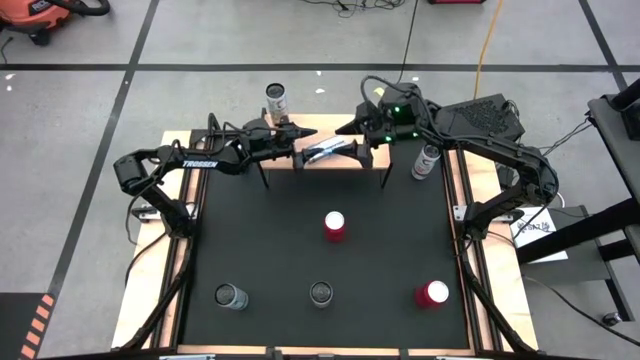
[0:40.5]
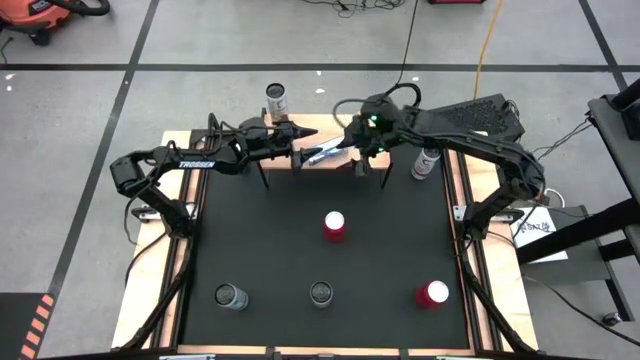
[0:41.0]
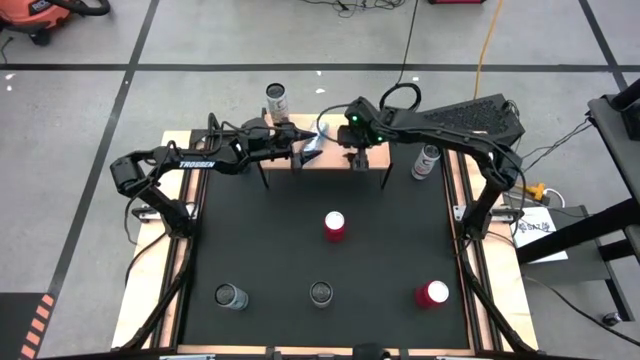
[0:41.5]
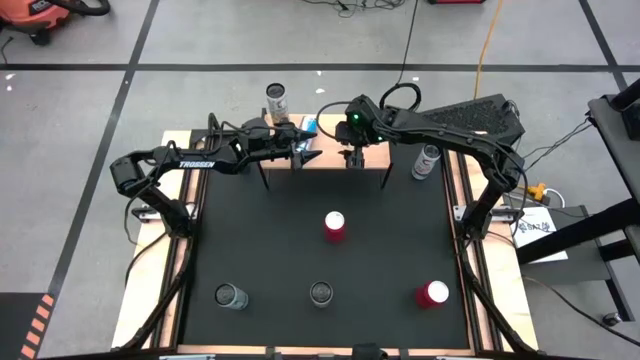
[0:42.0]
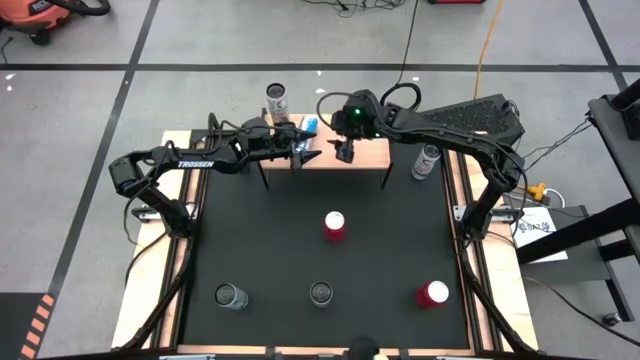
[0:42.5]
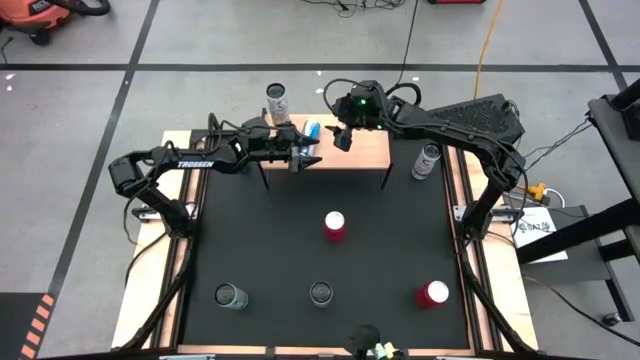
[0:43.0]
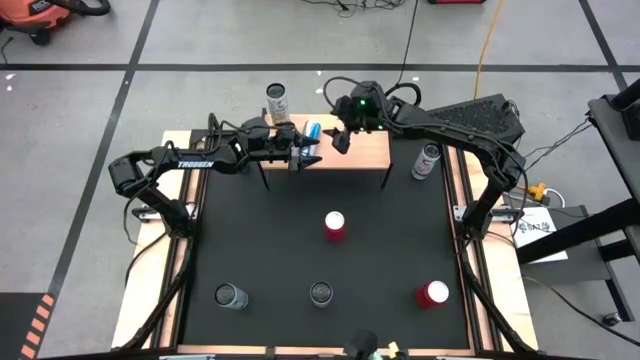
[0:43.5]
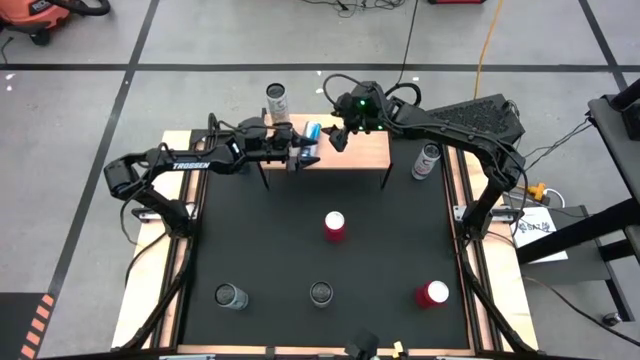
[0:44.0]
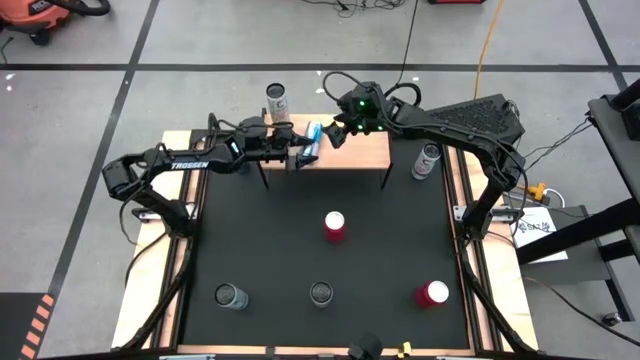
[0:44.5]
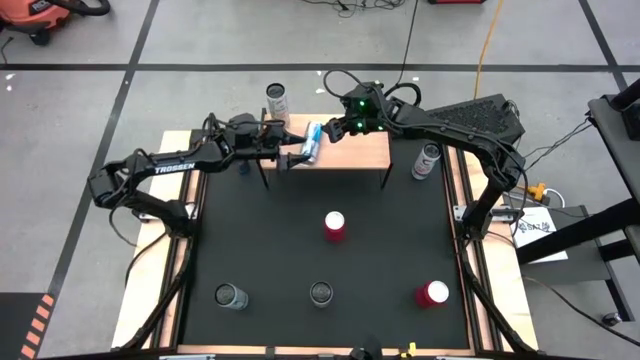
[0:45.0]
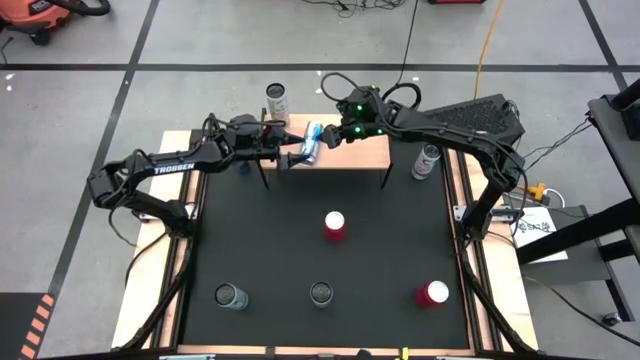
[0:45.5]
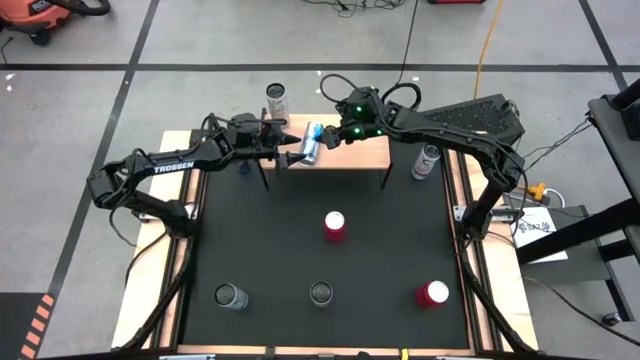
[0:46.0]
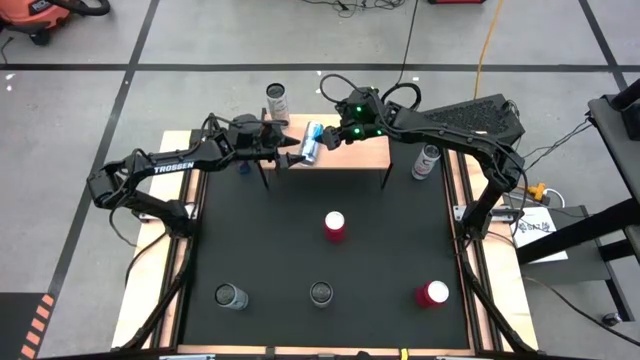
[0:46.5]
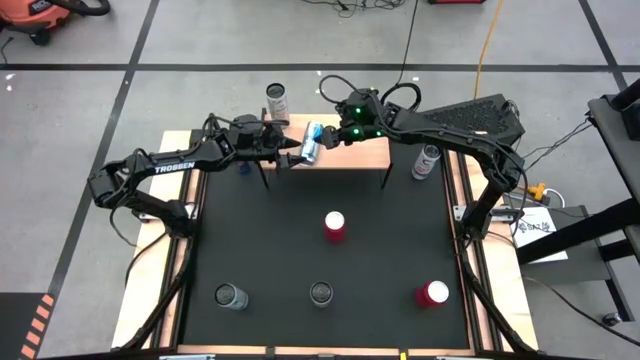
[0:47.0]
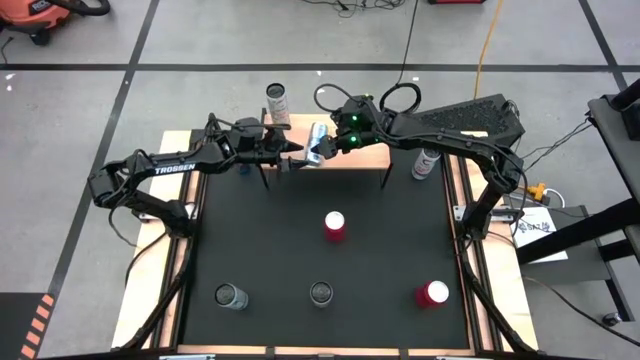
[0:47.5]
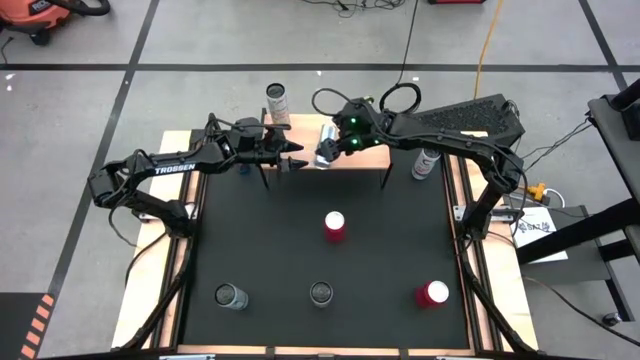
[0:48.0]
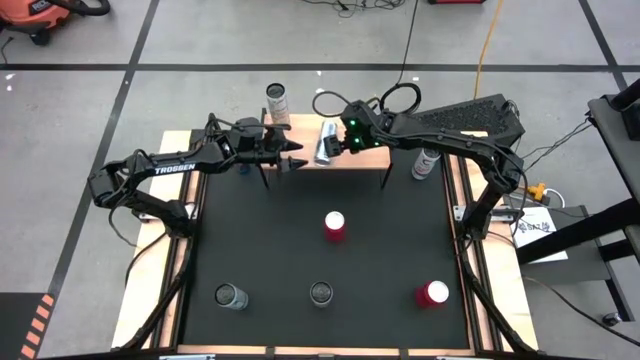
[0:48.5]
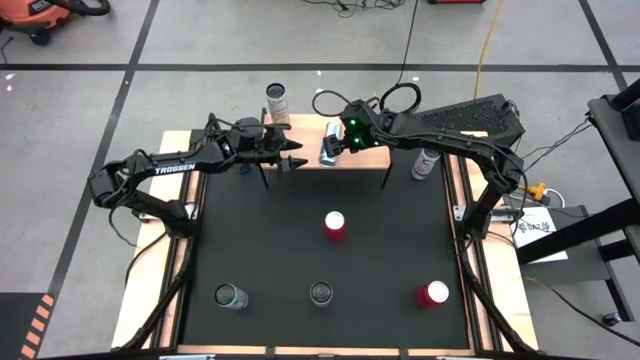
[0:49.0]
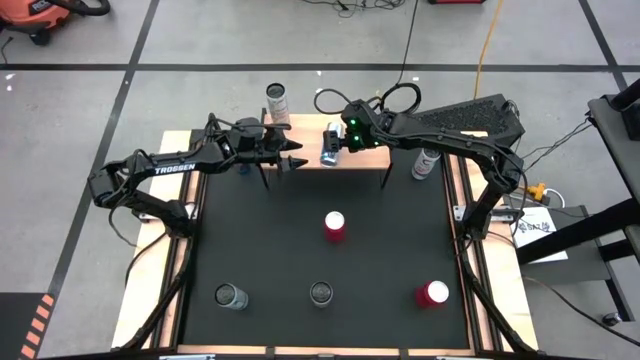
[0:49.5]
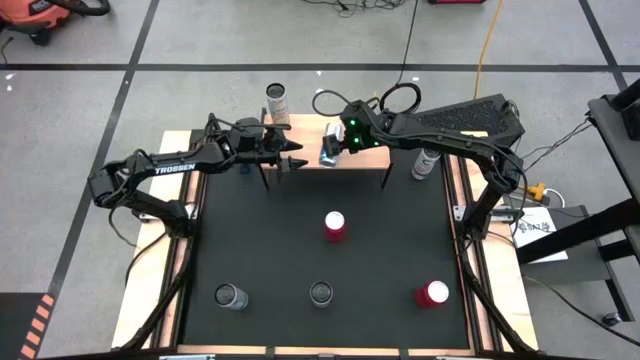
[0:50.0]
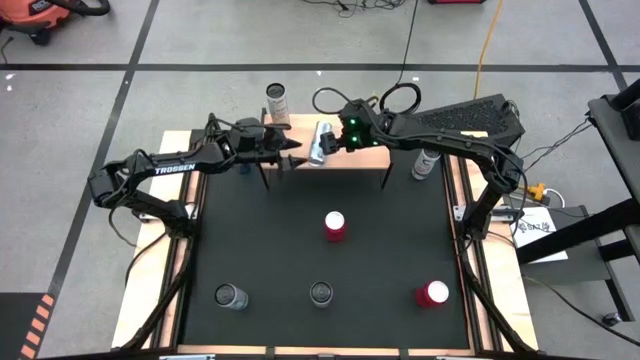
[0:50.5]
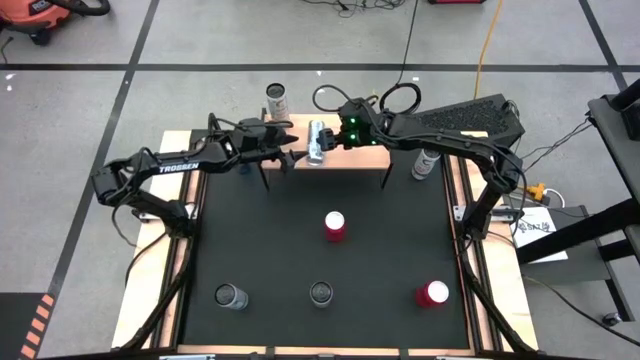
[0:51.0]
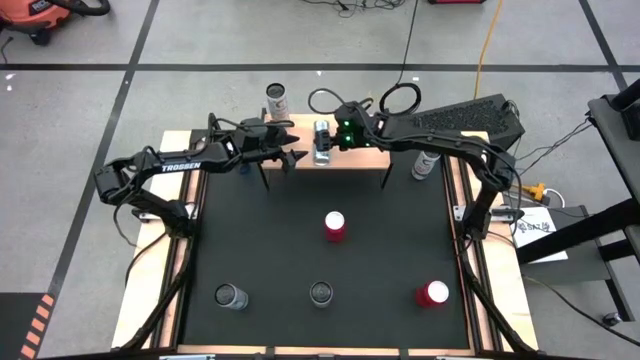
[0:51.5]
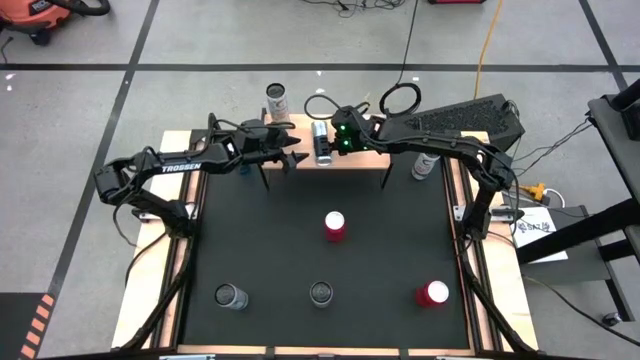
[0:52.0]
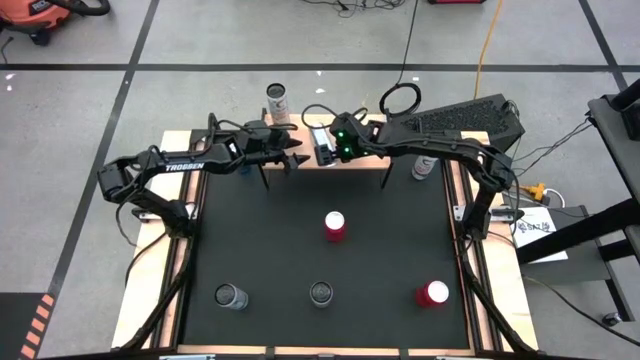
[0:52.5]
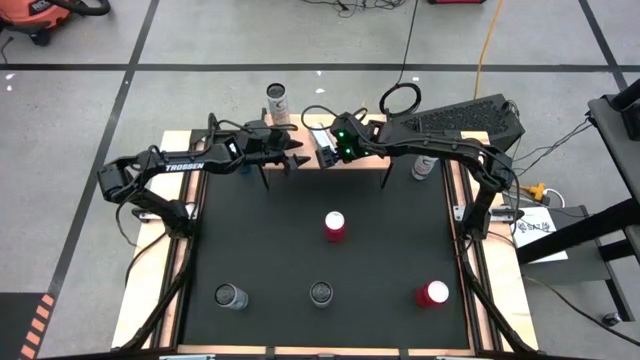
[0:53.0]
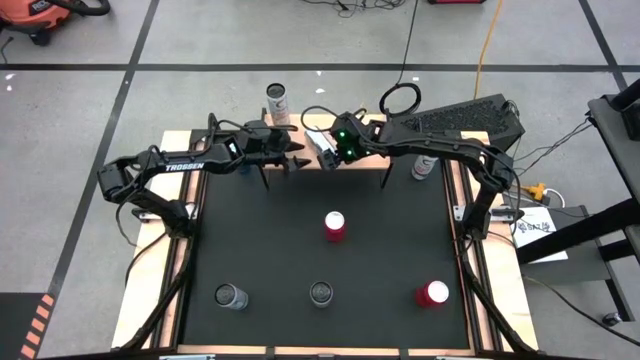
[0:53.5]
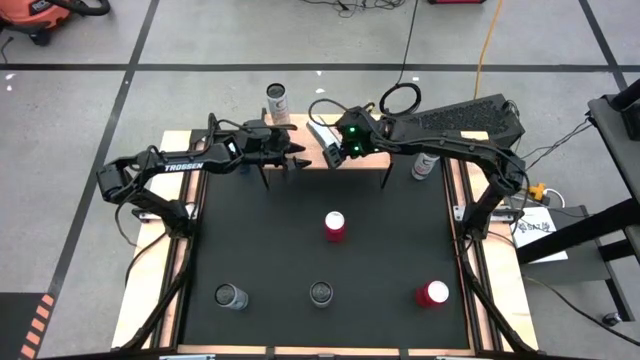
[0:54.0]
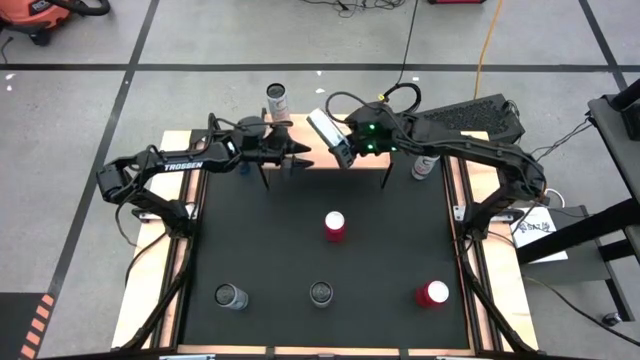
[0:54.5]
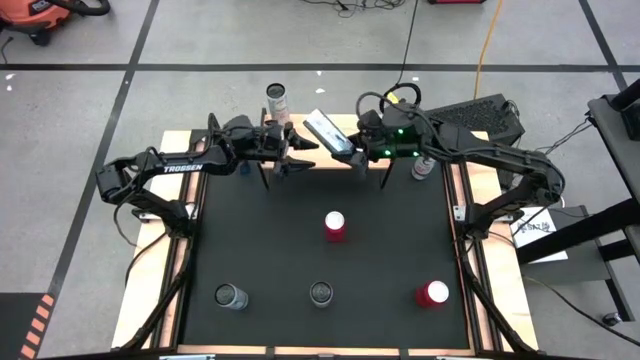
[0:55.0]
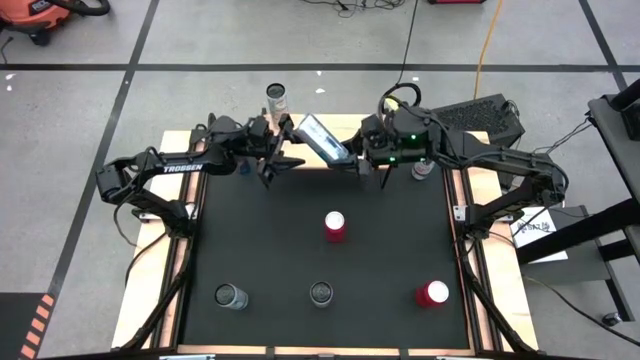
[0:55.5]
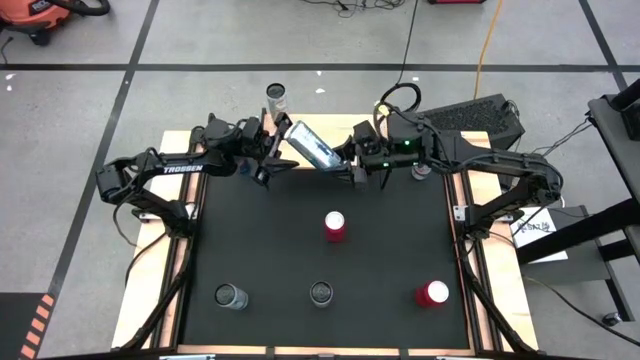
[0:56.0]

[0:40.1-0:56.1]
Task: Place canned beverage on shelf
Put the right blue soda can on the shelf

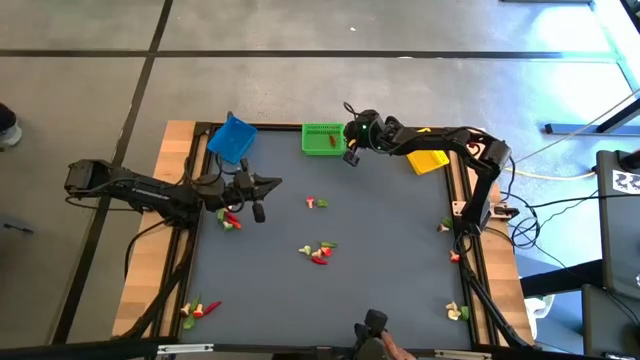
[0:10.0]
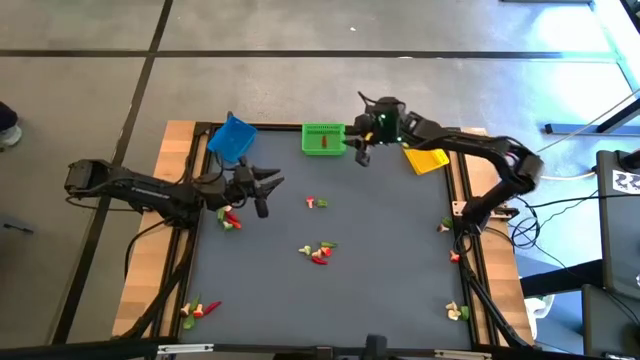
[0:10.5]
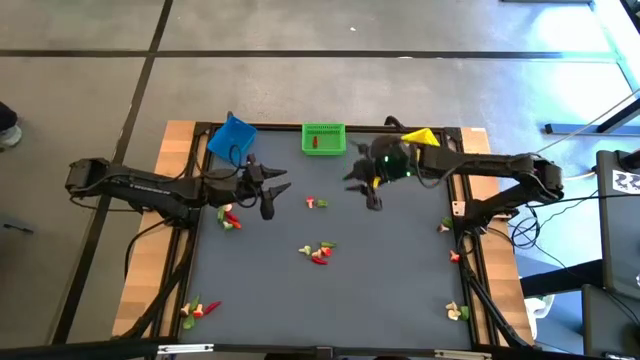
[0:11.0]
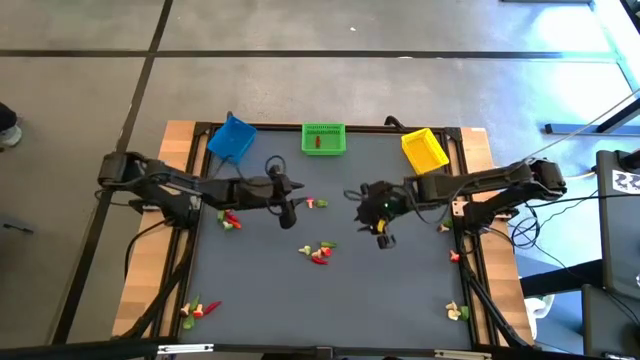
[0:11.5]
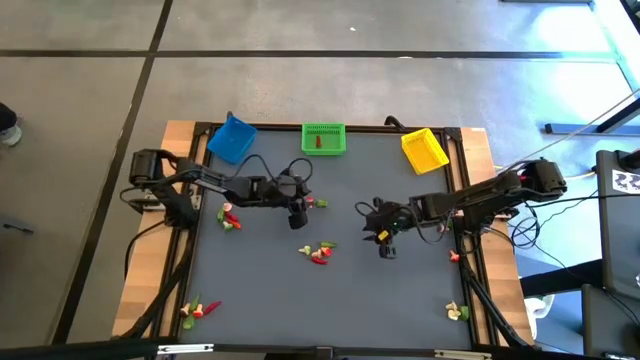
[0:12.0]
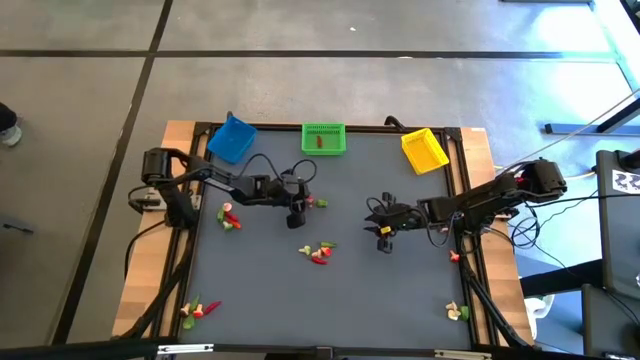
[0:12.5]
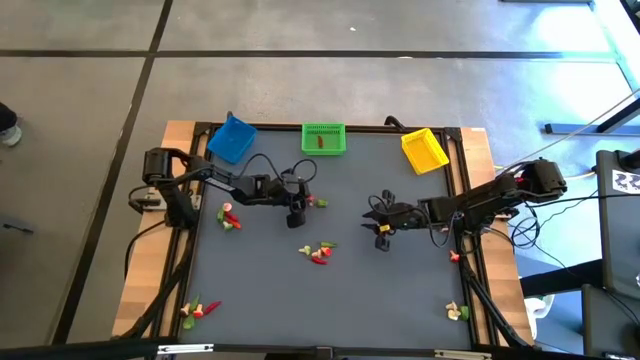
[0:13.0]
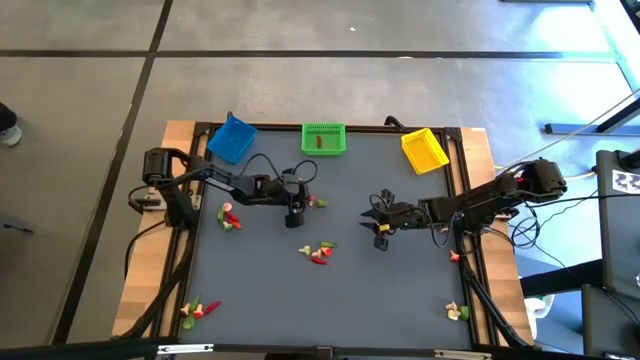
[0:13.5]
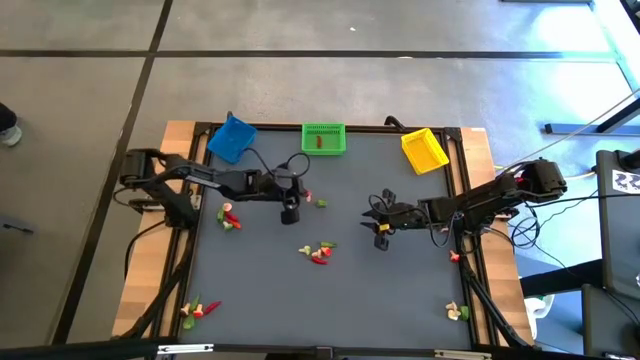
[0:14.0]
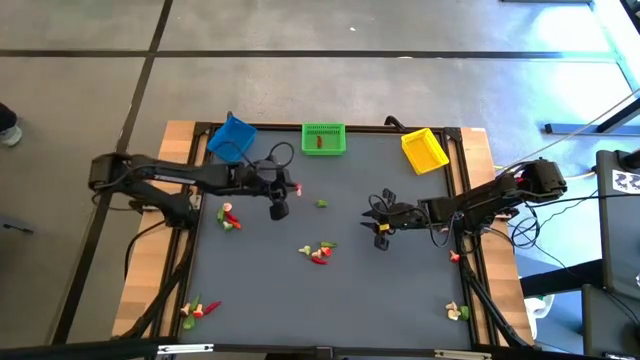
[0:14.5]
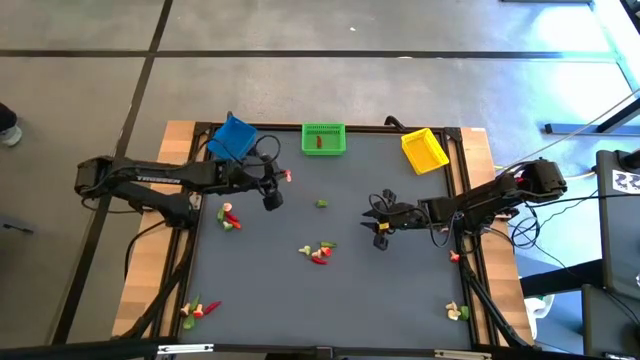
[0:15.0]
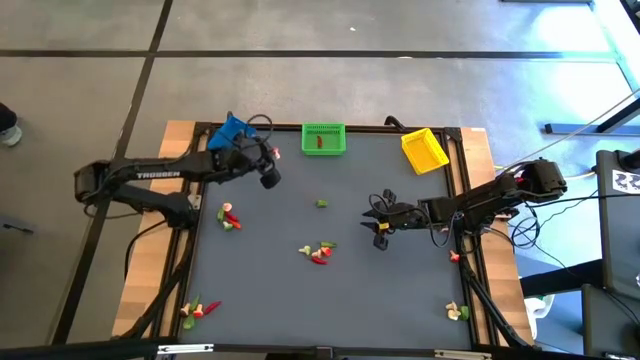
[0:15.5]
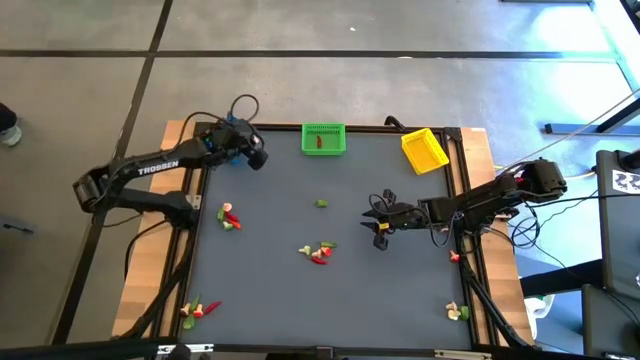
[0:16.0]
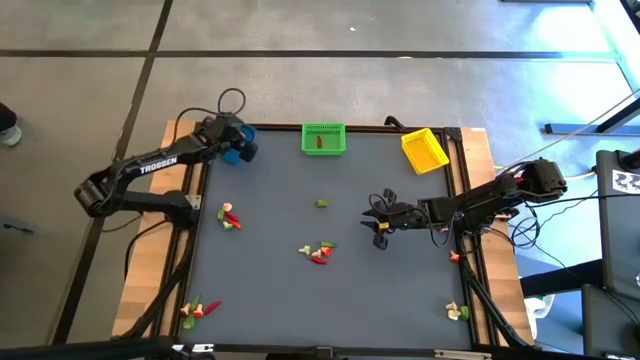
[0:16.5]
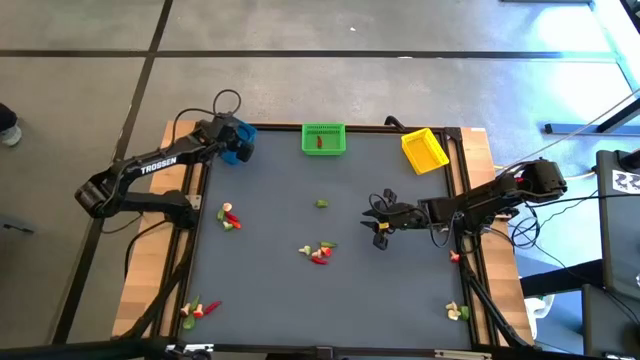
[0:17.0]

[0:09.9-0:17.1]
Task: Sort produce into baskets
Put the red mushroom into the blue bin
